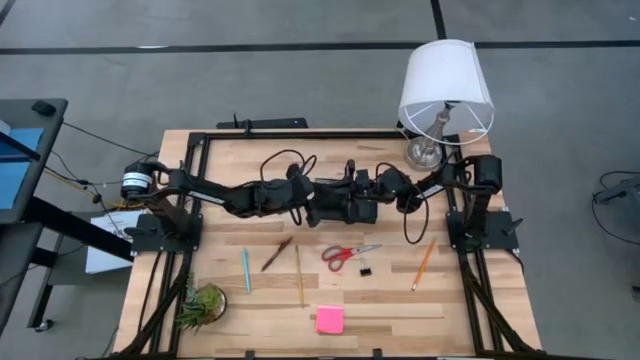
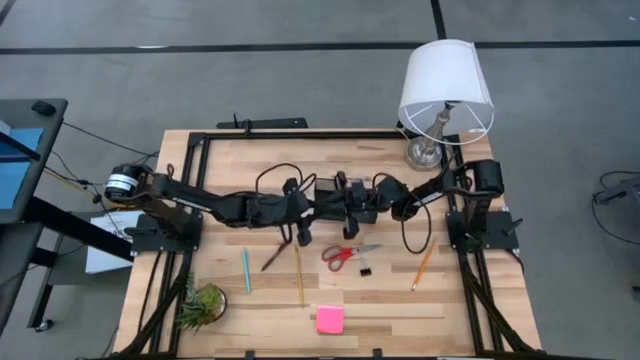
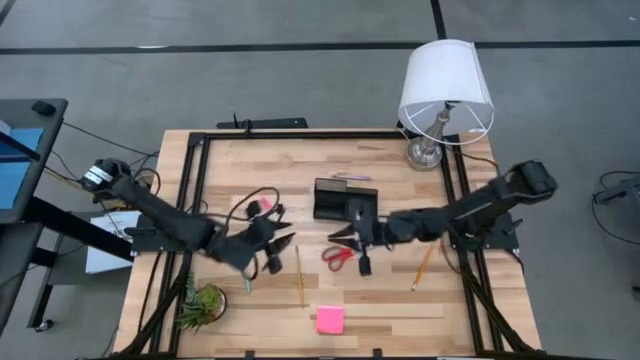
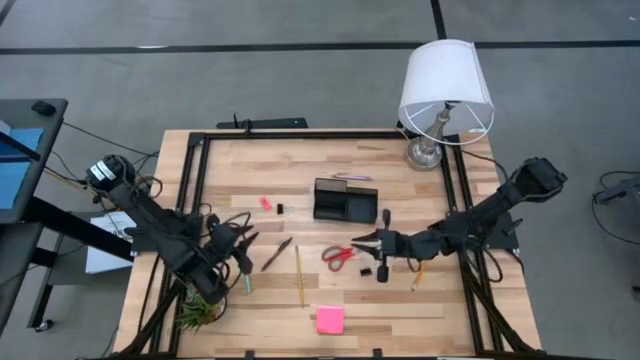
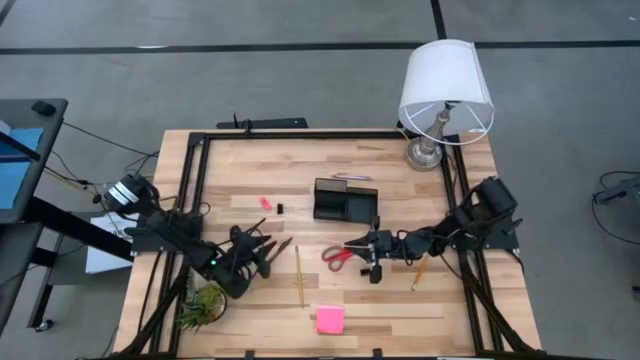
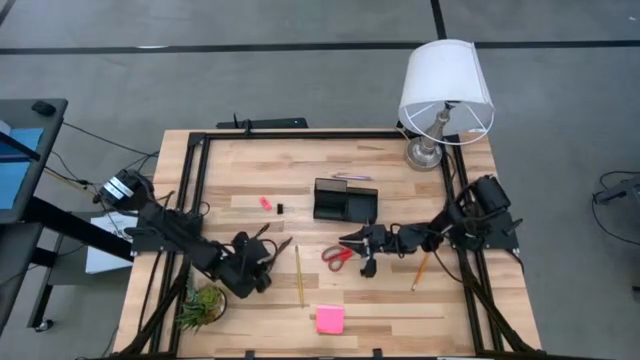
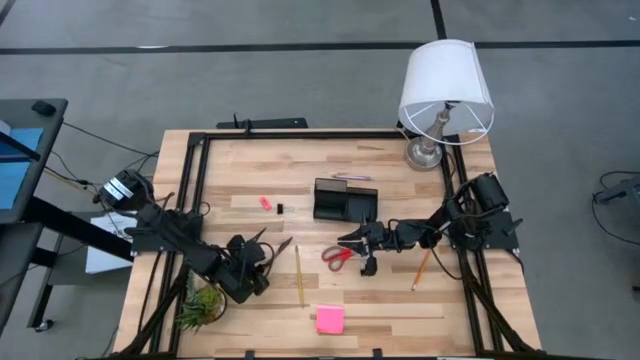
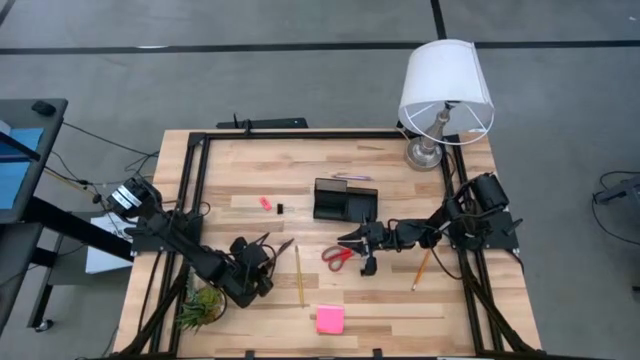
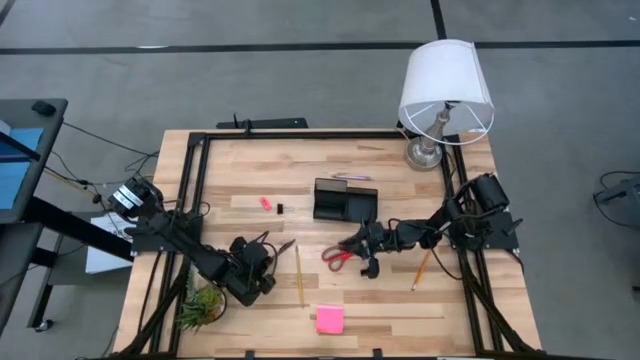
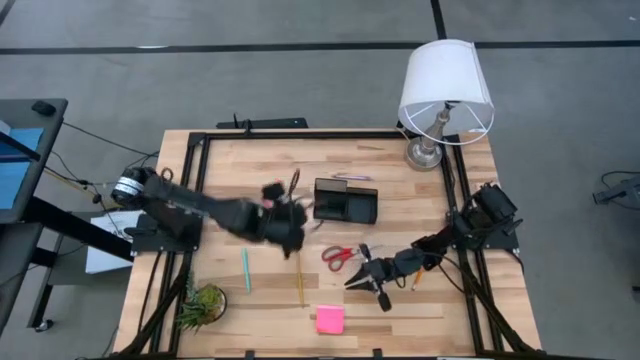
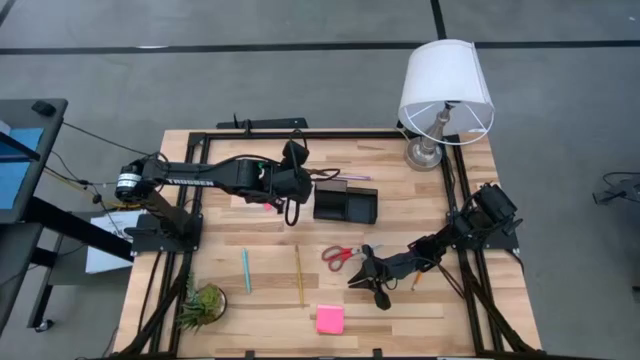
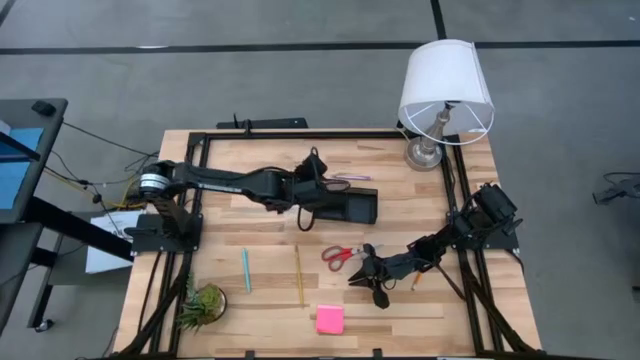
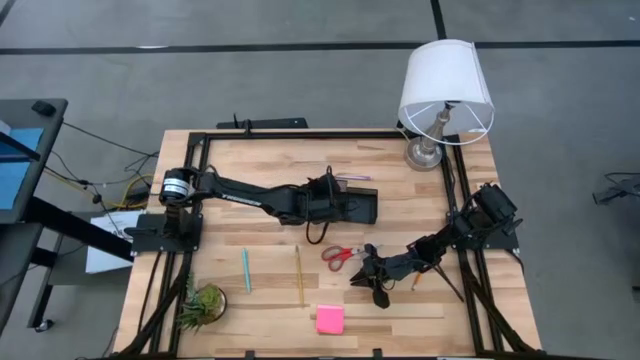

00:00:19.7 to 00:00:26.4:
Task: Pick and place office supplies into organizer
Put the brown pen into the desk organizer

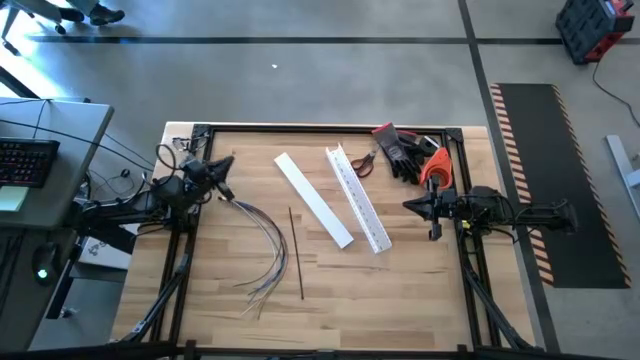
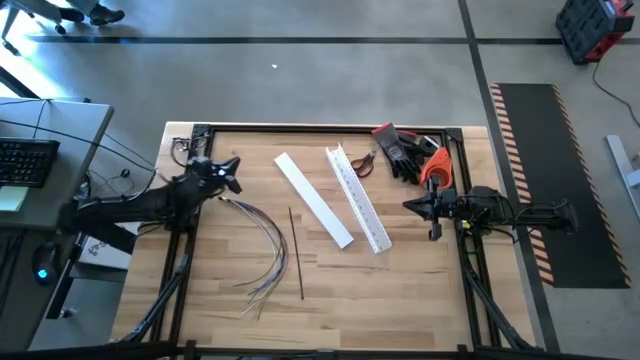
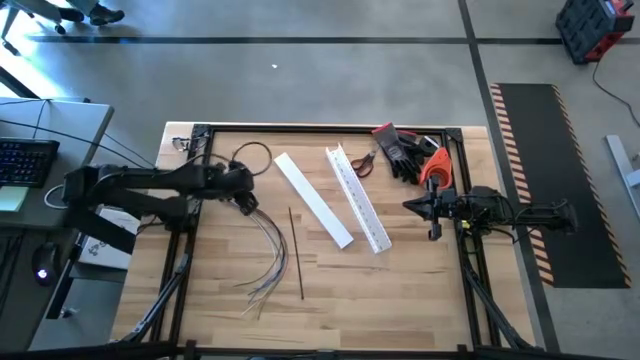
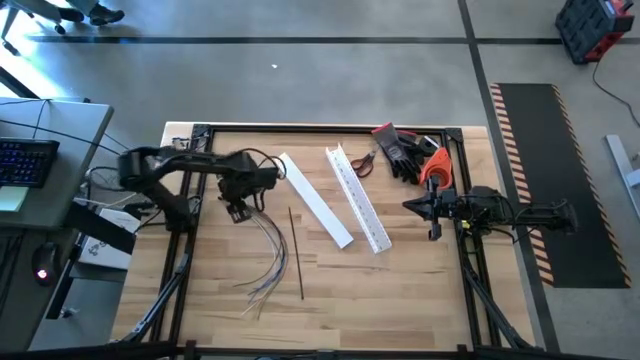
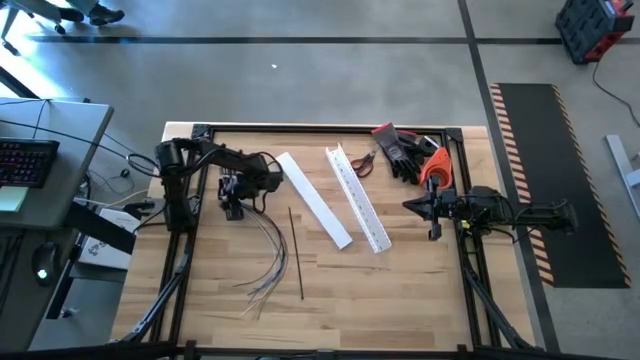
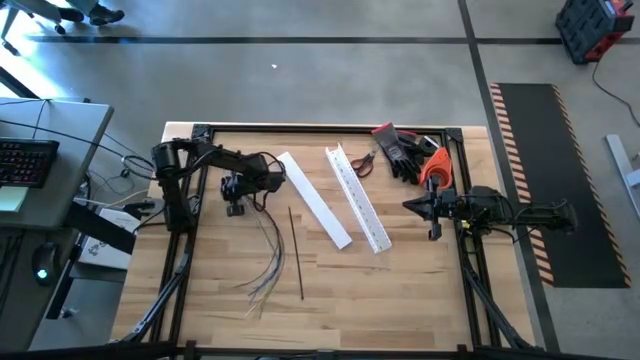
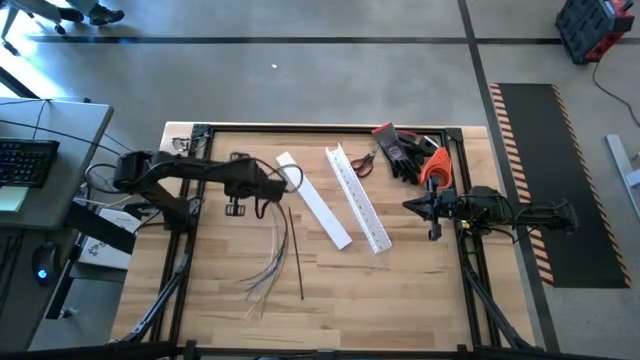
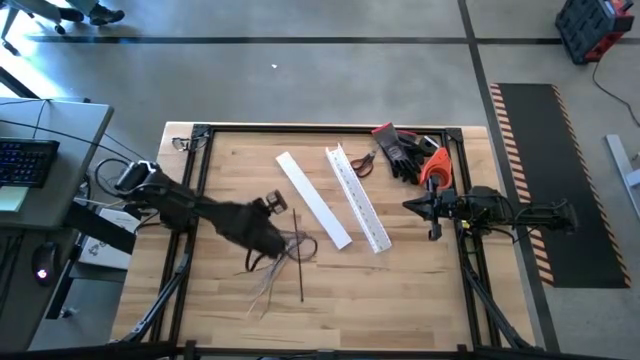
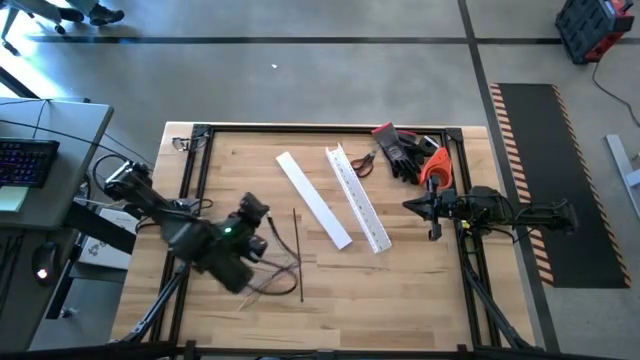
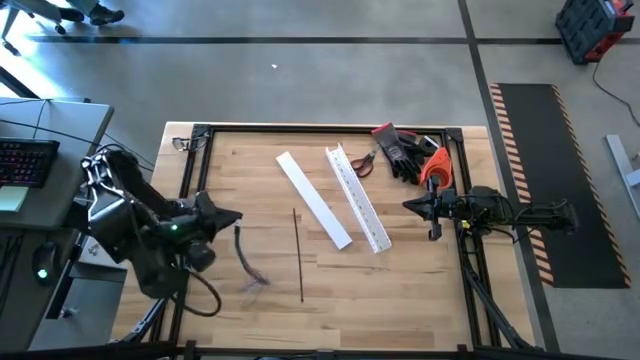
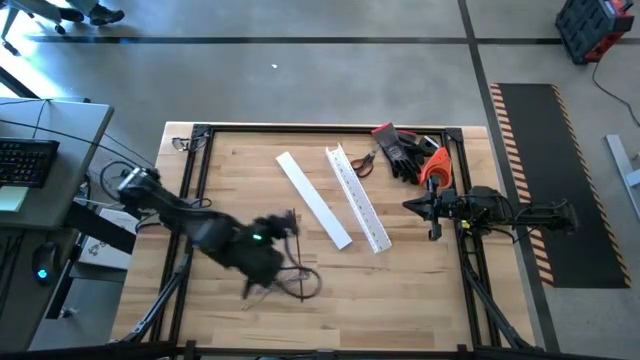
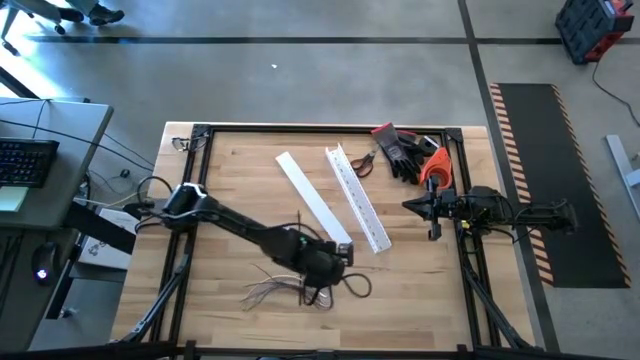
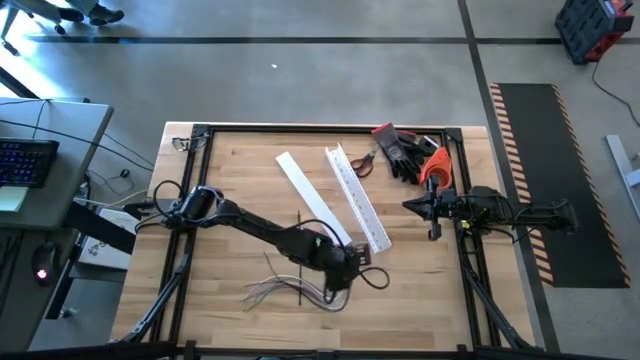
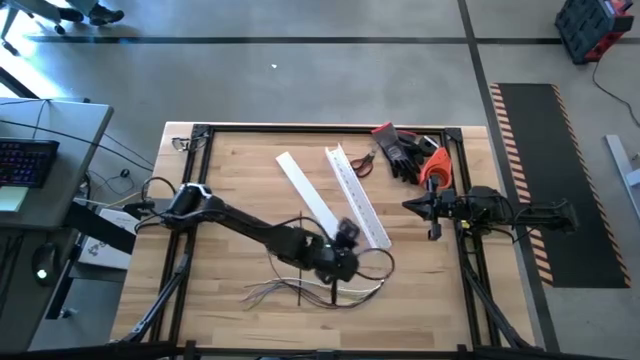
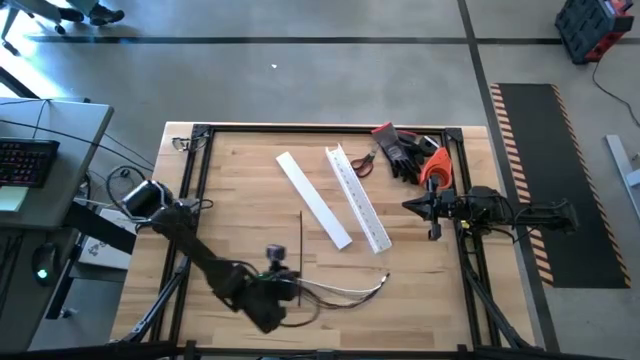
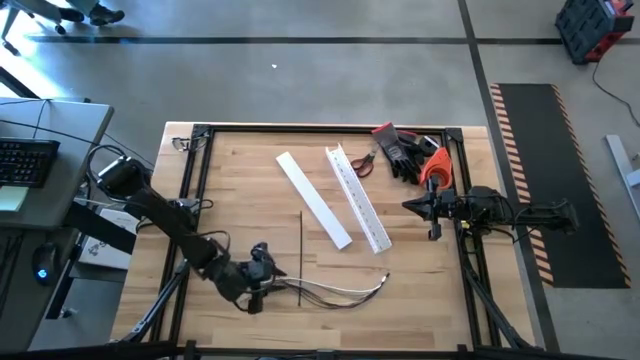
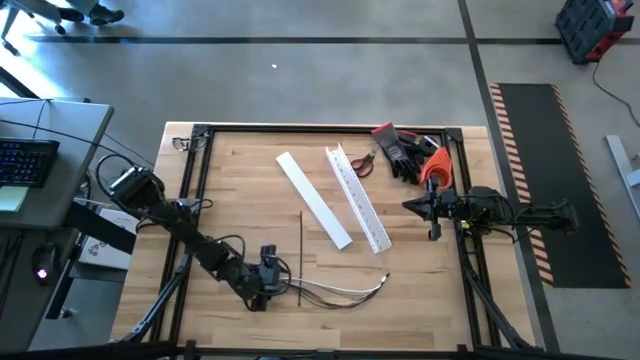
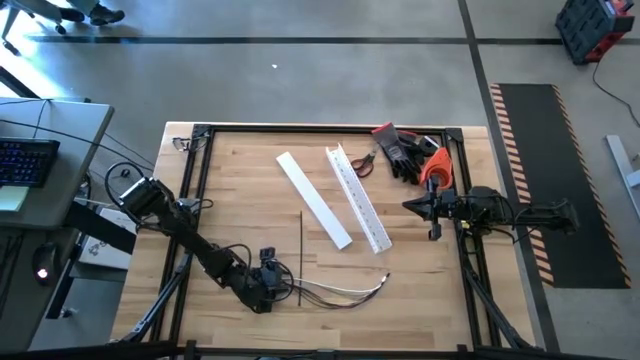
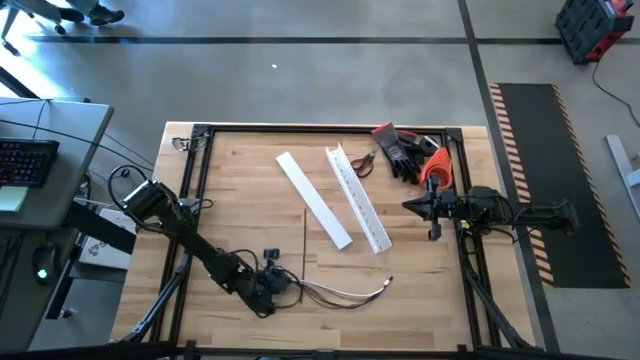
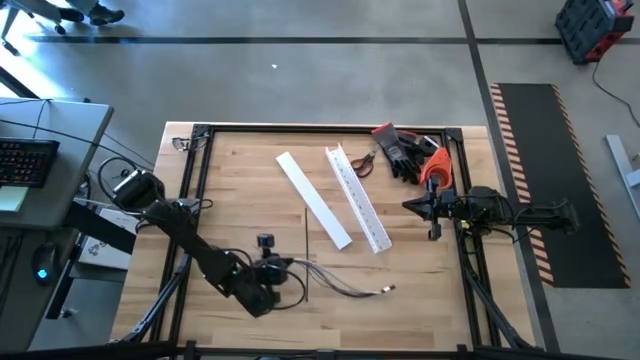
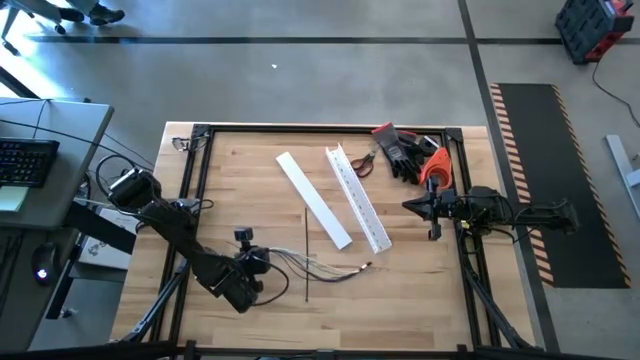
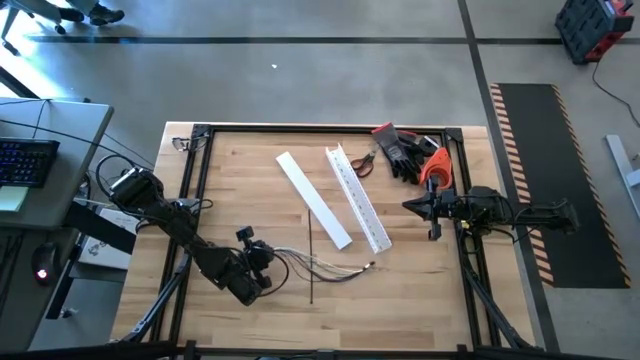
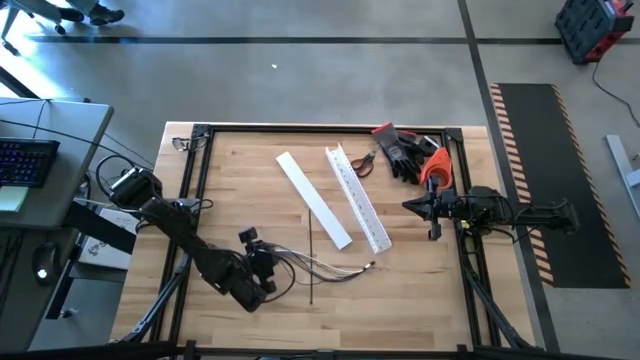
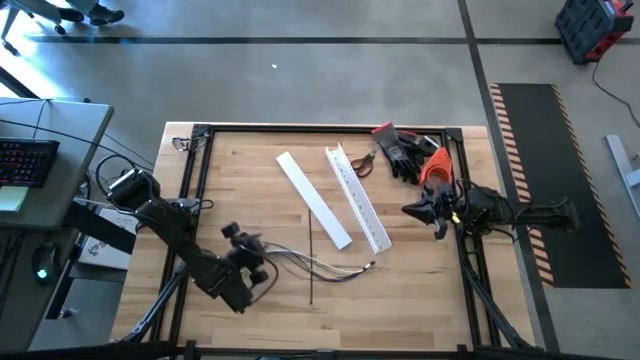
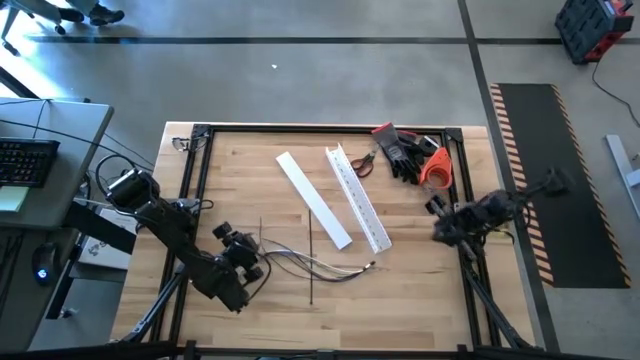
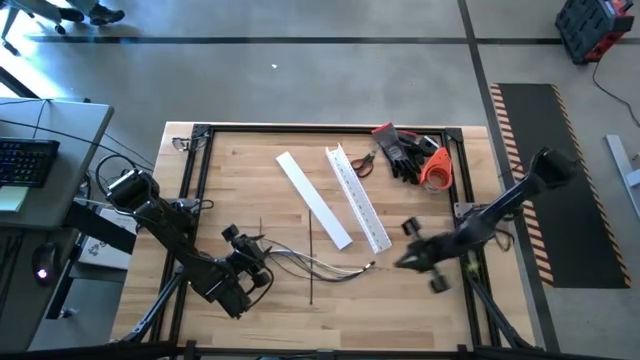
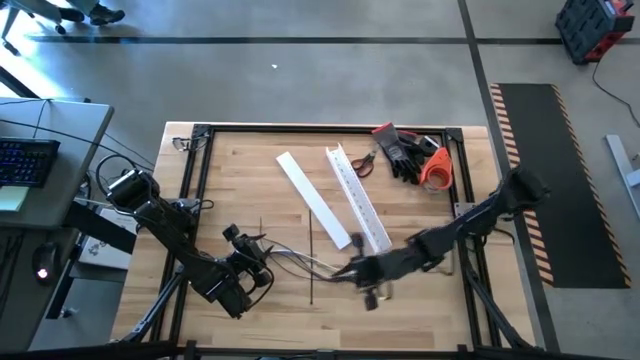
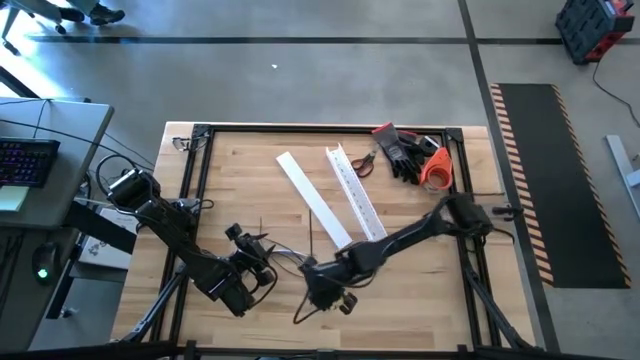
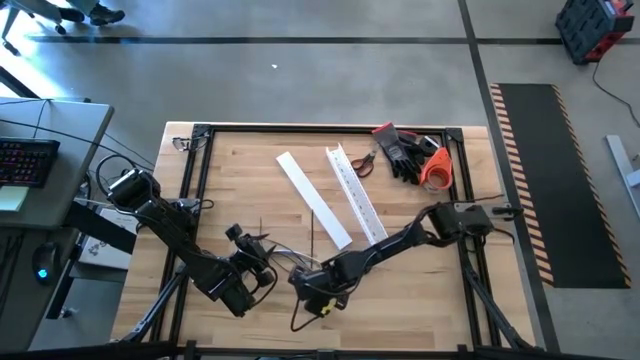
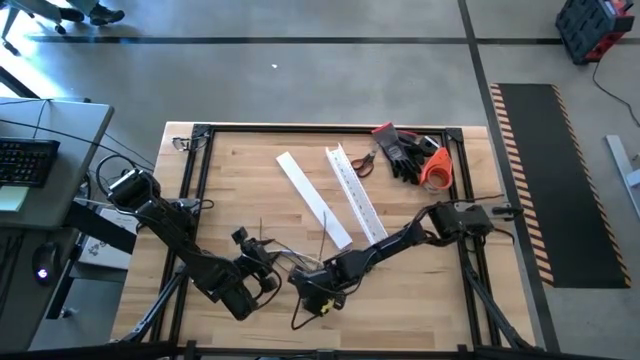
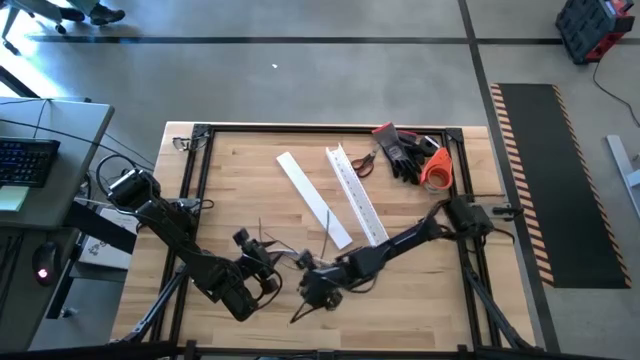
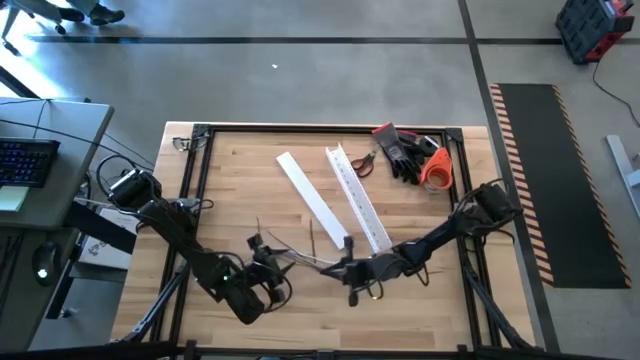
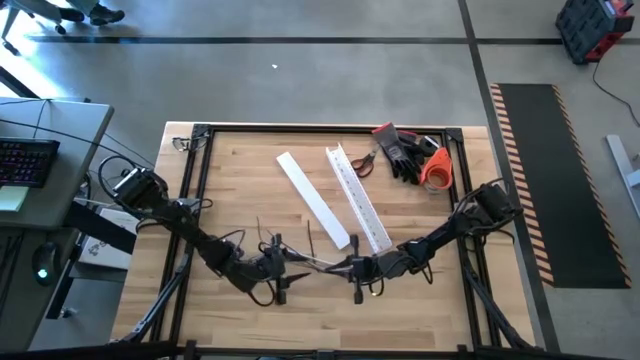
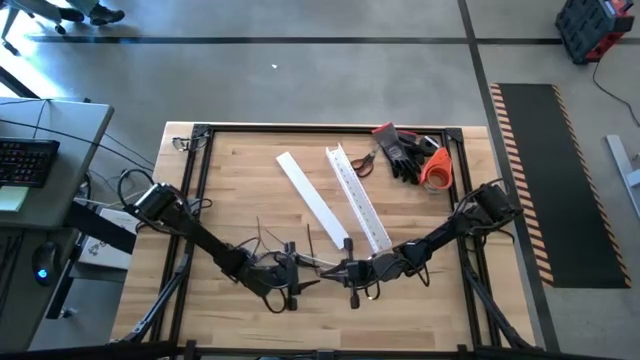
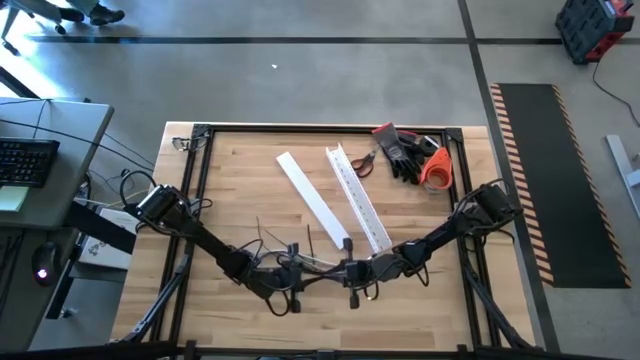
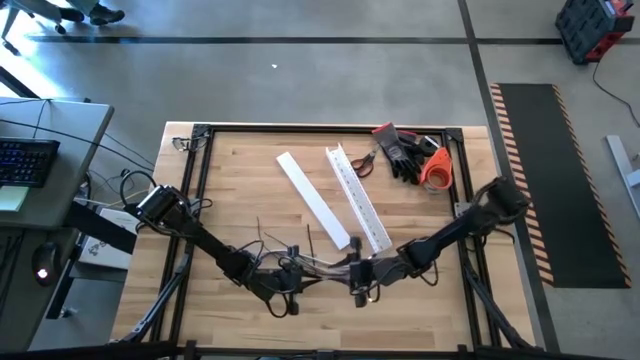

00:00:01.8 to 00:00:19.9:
Task: Ziptie cables
Wrap the colored cables with the black zip tie
